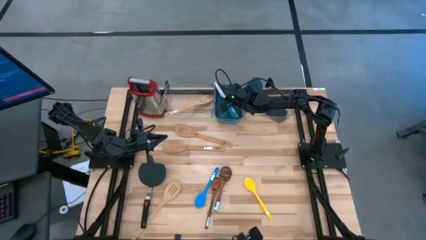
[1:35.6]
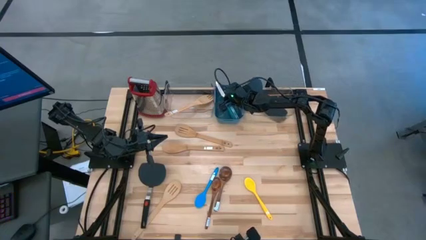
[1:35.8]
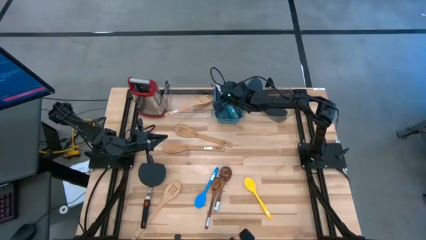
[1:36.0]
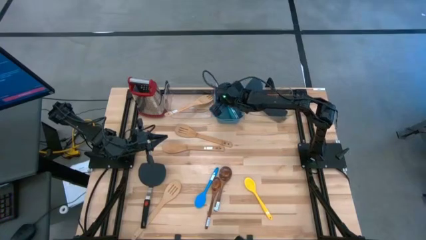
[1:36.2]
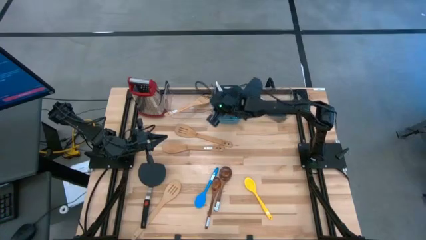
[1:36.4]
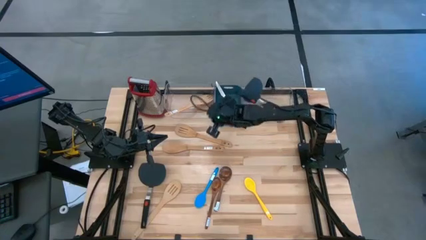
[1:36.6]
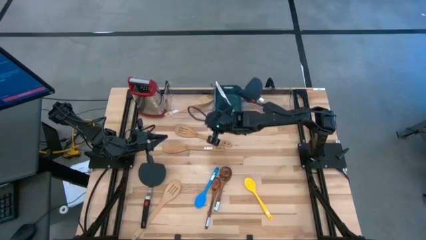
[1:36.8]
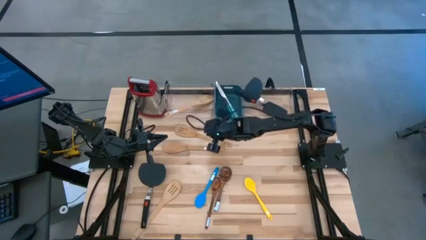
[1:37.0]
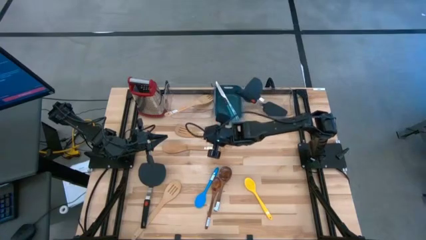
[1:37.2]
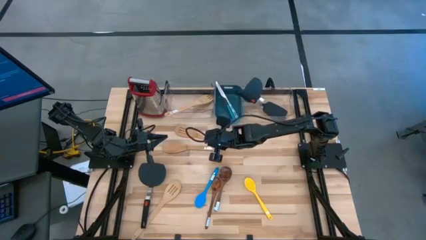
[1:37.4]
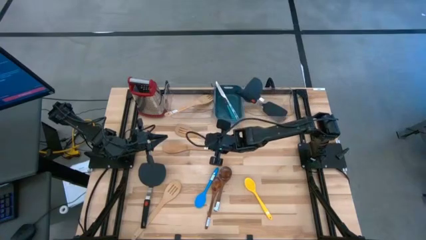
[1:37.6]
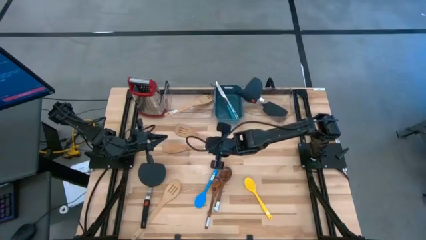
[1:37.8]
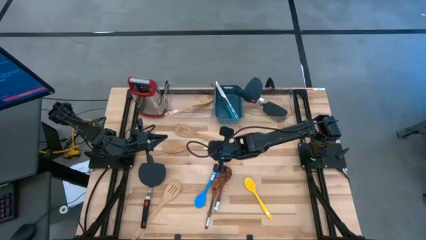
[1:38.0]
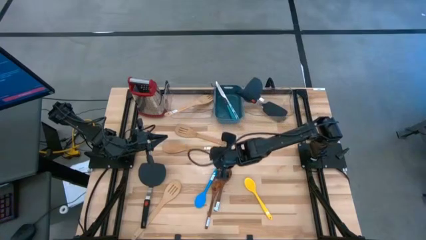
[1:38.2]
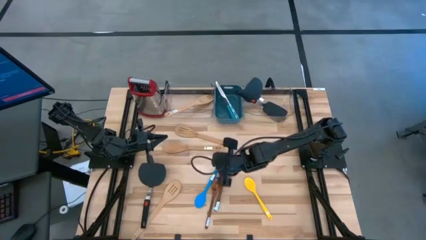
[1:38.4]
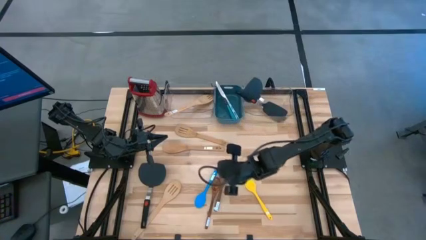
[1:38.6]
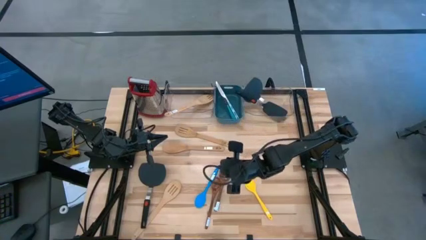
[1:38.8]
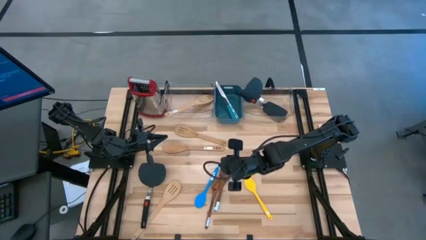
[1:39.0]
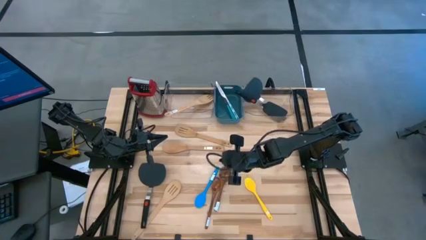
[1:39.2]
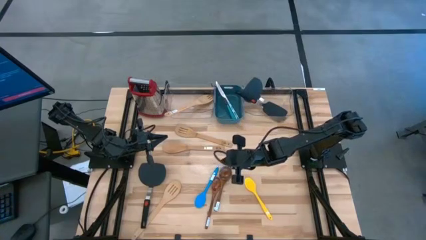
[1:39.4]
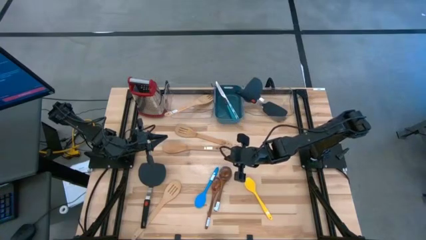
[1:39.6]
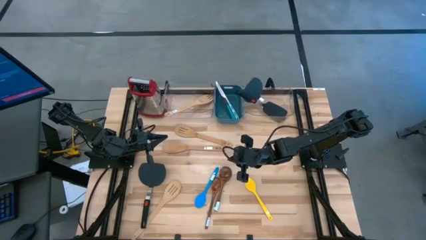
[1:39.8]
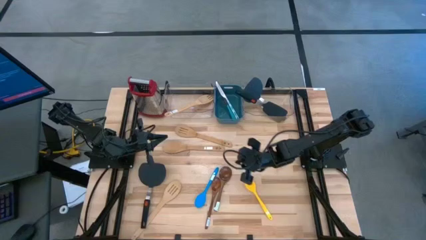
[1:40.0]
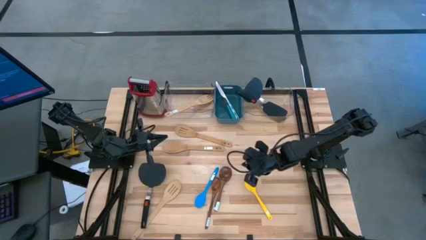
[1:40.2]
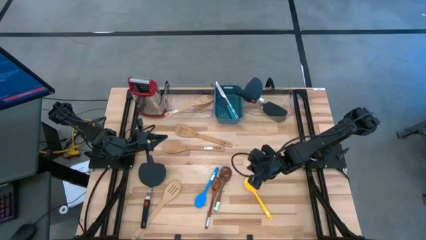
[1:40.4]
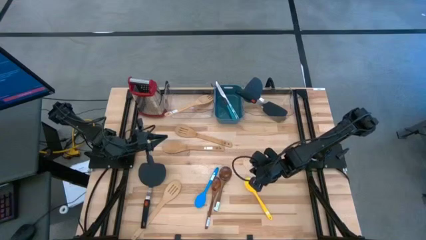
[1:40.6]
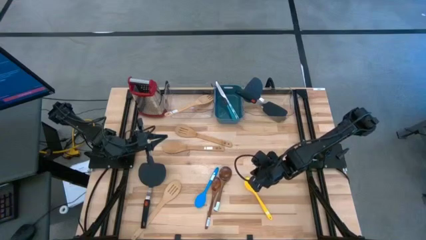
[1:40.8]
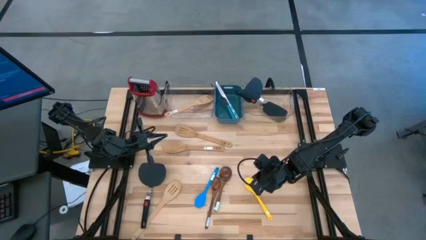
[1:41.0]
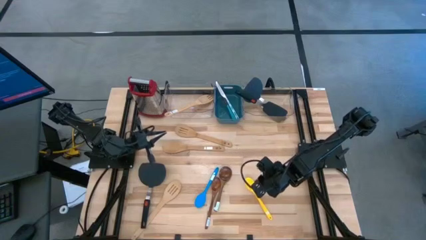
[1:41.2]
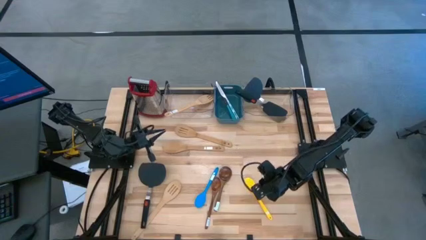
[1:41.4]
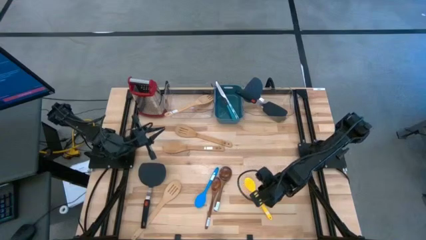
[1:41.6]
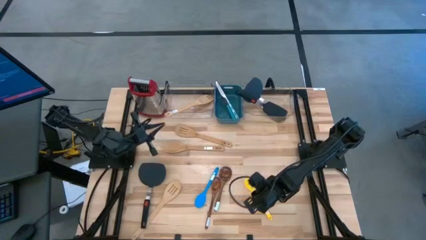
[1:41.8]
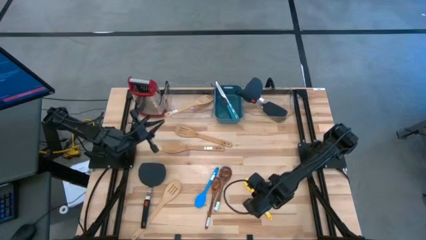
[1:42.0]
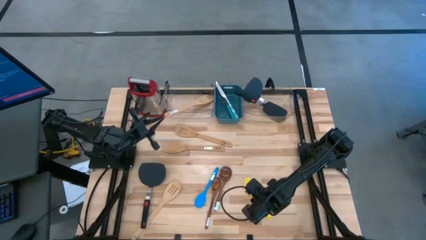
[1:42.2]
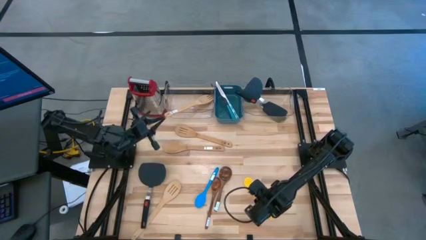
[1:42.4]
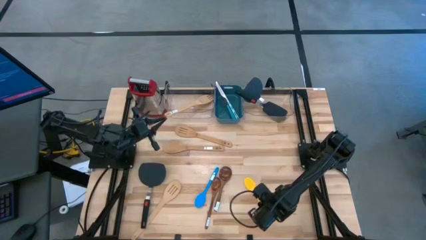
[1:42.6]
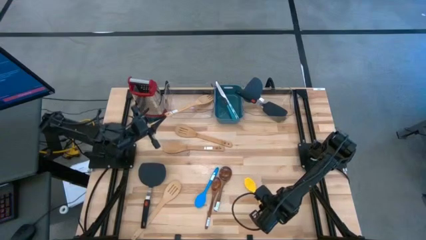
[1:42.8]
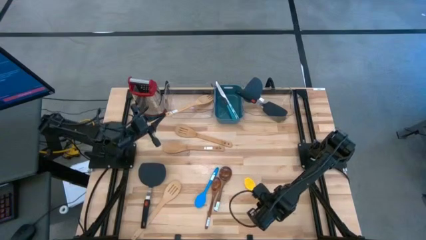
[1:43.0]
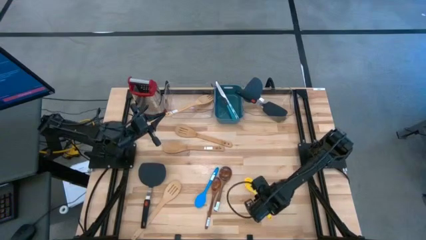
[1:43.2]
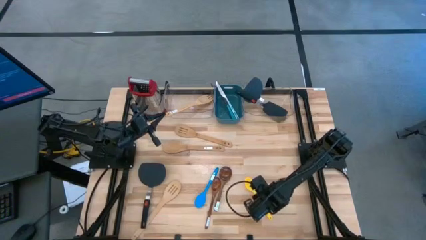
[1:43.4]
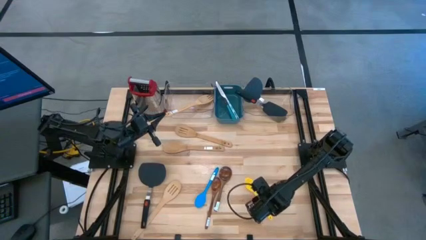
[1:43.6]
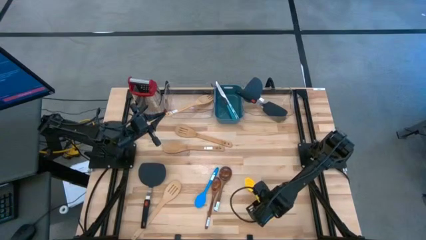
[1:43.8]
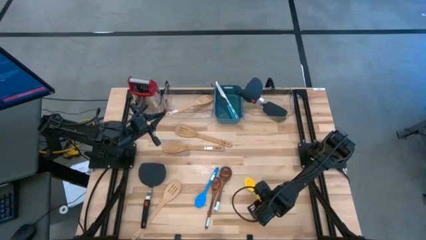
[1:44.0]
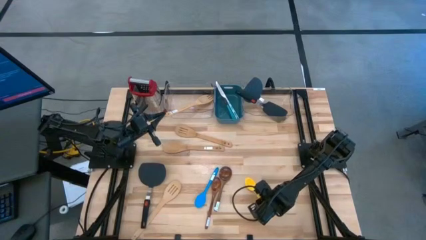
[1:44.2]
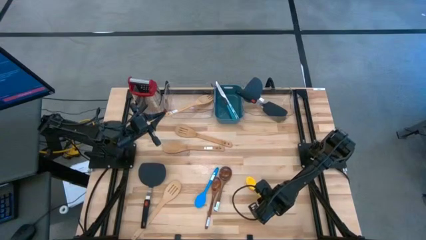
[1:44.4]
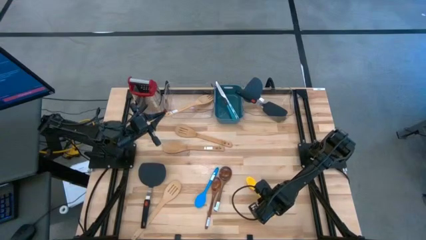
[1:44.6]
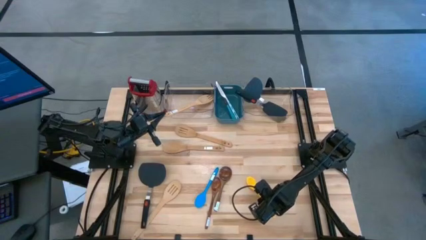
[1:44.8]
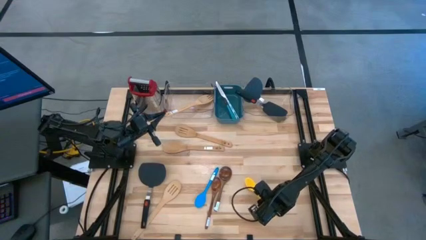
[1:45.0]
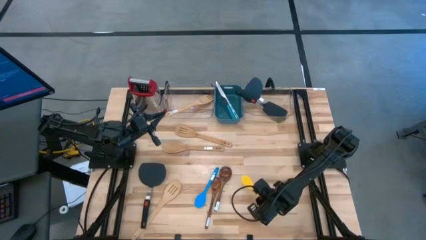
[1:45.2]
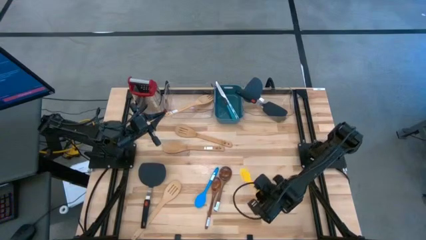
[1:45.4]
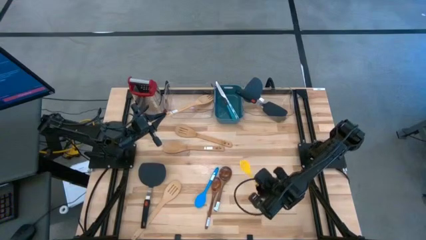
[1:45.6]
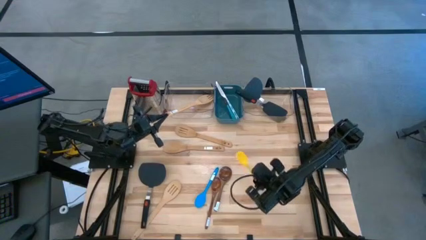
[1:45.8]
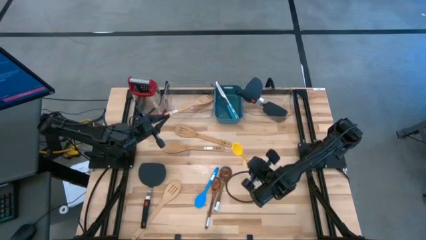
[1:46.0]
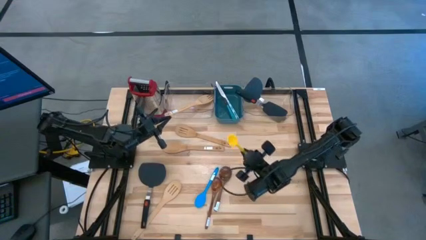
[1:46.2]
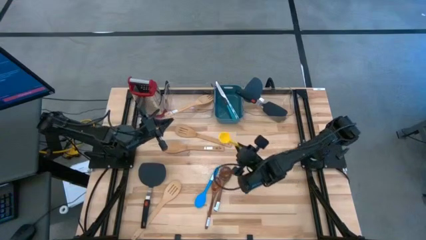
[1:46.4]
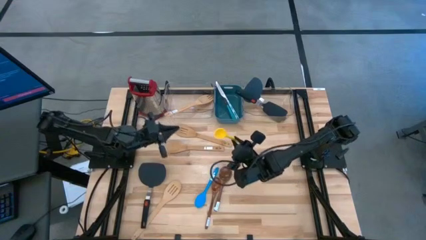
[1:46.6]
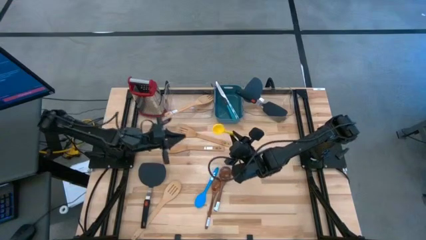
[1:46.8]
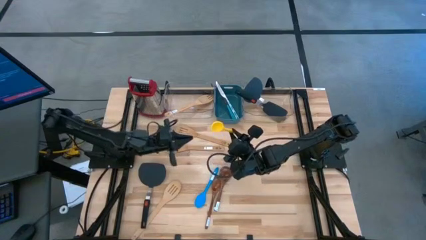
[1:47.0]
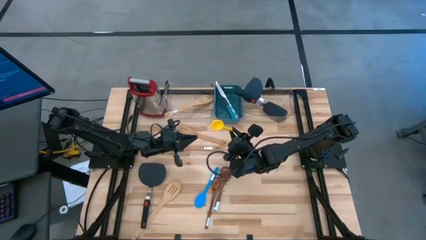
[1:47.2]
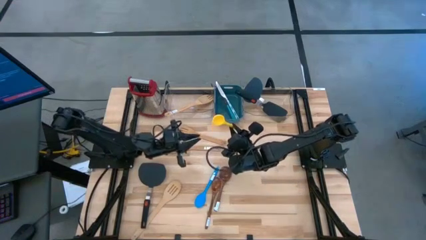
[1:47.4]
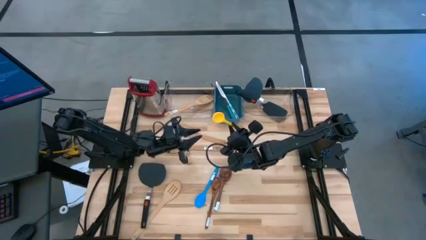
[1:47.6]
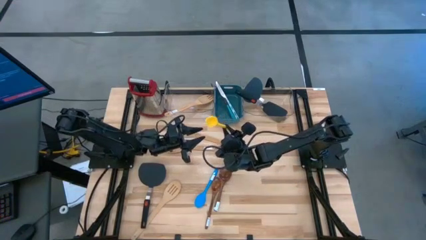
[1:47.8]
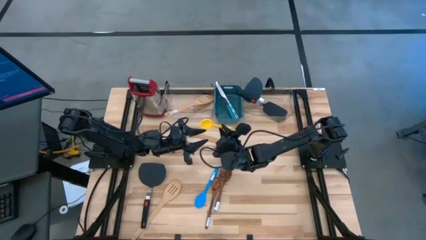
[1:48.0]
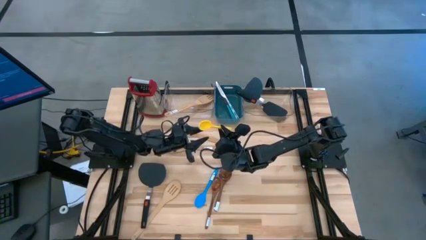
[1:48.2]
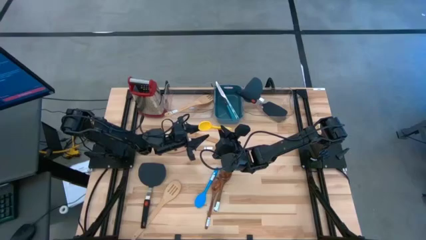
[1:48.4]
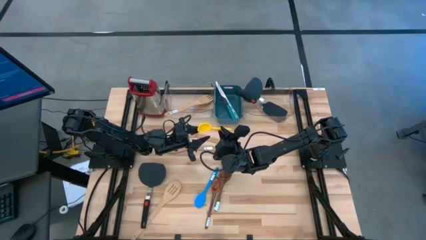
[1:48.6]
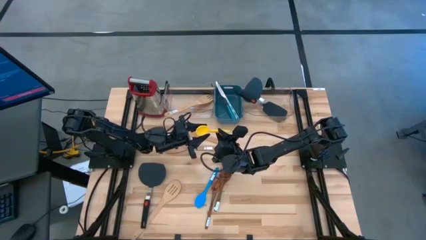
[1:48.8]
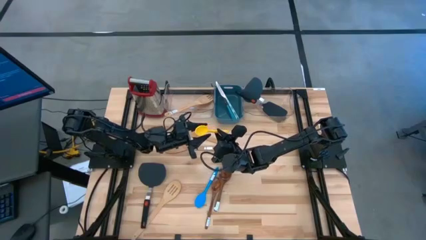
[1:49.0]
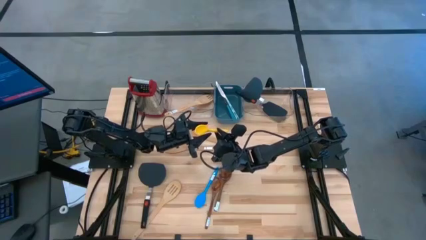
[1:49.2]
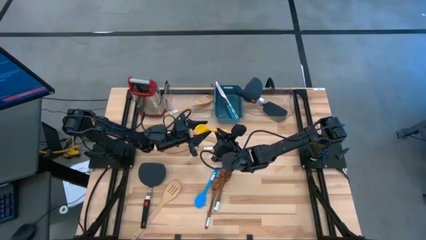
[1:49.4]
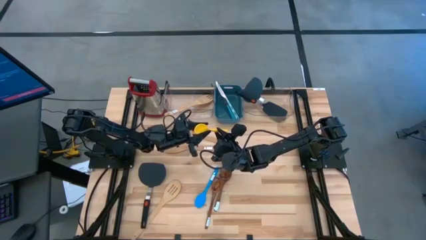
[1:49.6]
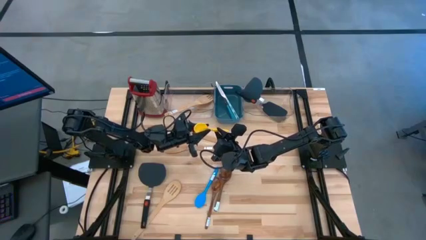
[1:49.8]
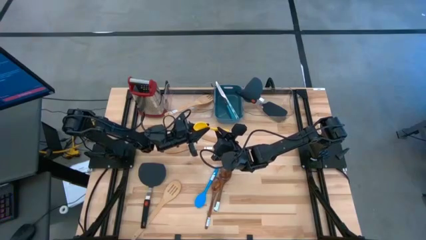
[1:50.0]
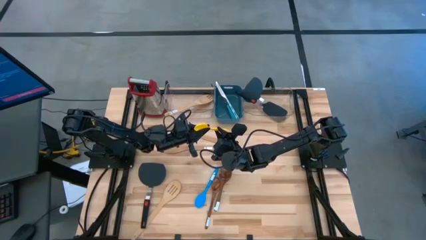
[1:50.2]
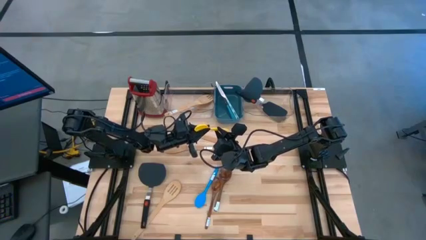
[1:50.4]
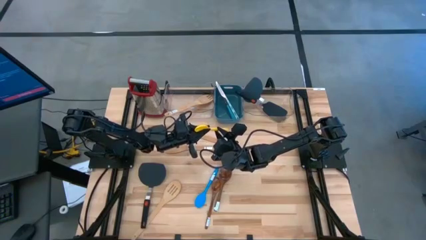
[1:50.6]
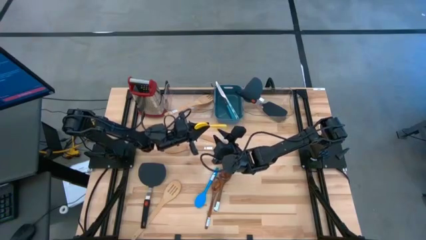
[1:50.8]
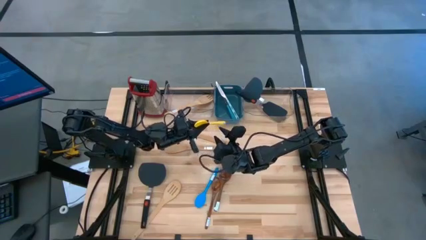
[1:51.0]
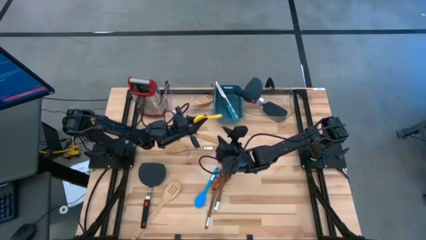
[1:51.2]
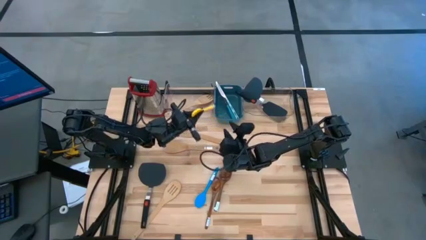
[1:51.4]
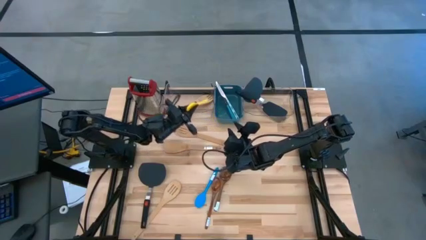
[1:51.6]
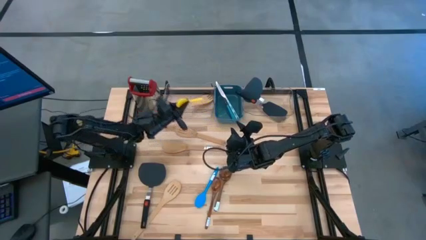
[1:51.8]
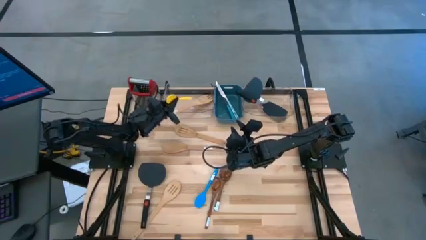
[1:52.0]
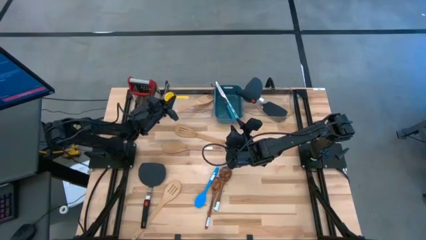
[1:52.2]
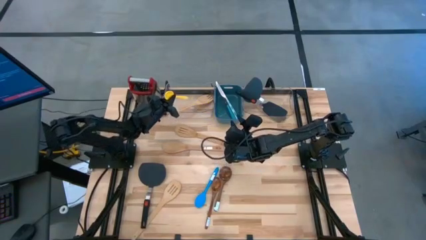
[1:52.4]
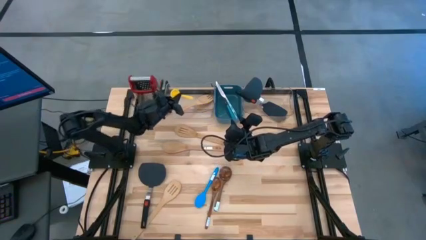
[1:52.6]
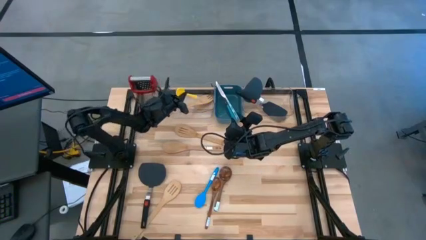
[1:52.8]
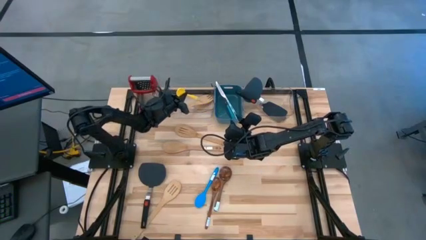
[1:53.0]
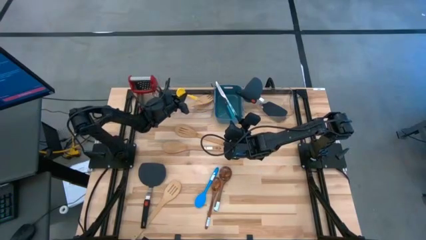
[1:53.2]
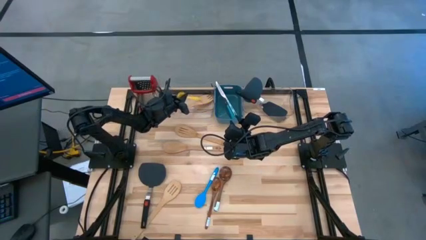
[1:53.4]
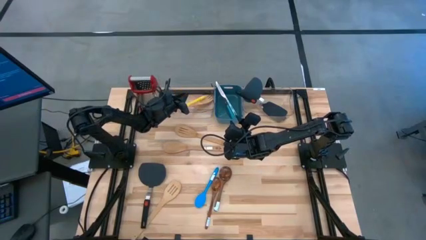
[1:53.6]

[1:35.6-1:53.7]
Task: Pick & Place Kitchen Items
Put the yellow serving spoon into the left transparent bin
